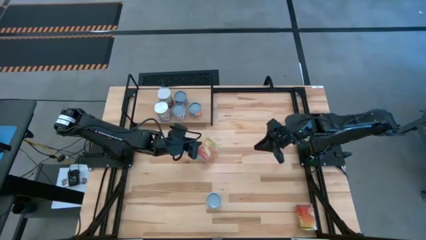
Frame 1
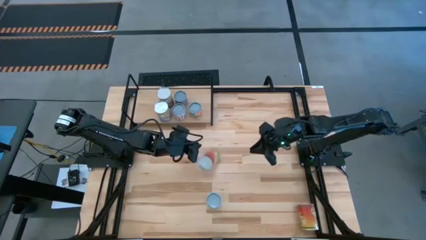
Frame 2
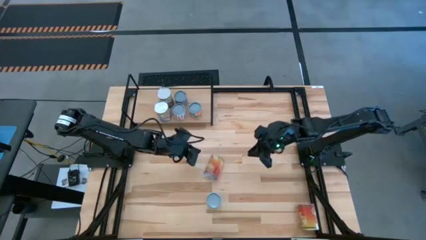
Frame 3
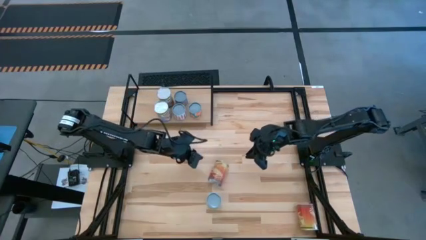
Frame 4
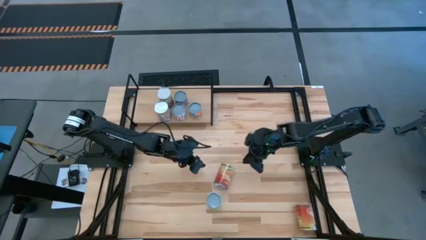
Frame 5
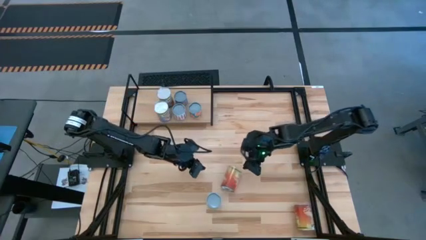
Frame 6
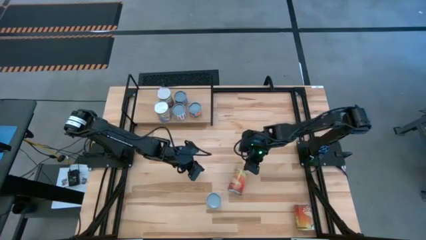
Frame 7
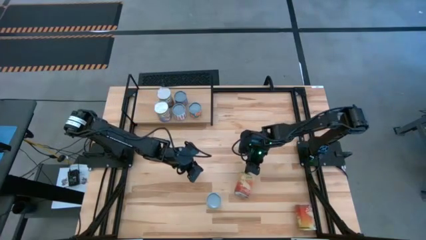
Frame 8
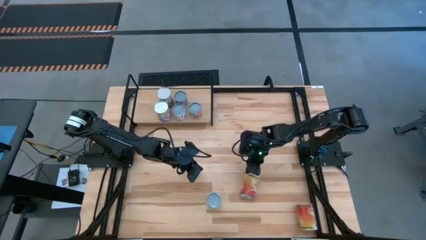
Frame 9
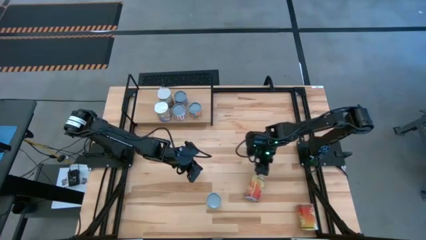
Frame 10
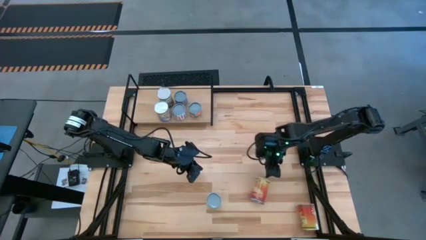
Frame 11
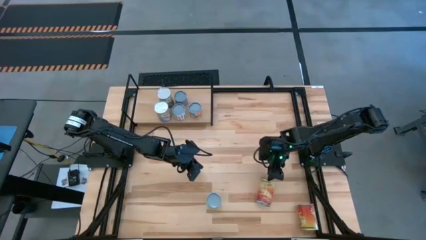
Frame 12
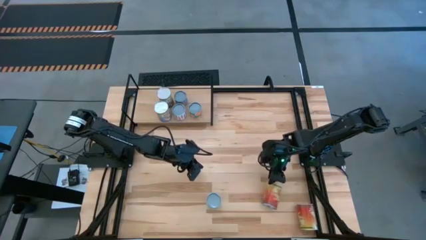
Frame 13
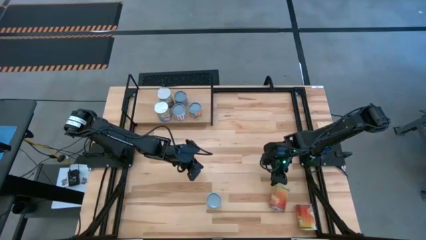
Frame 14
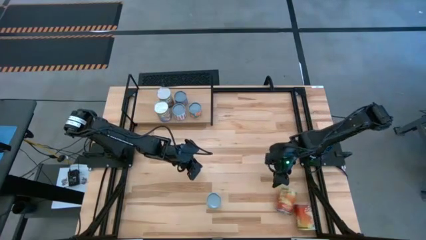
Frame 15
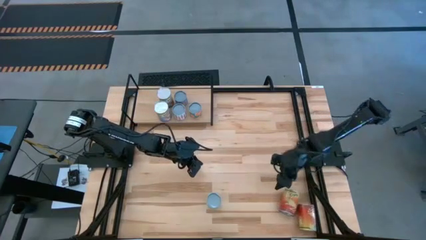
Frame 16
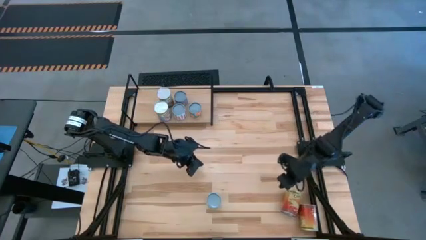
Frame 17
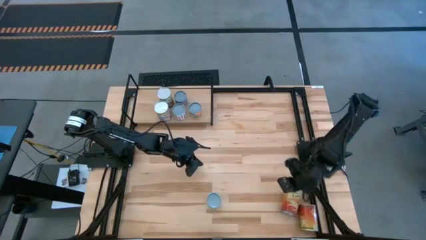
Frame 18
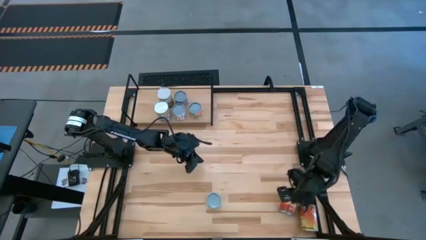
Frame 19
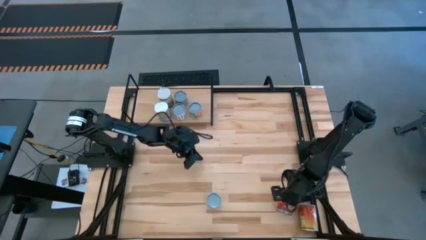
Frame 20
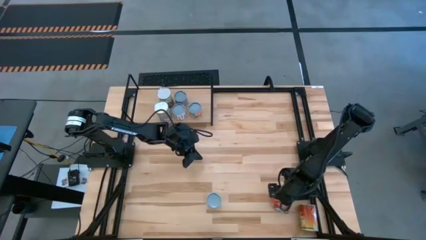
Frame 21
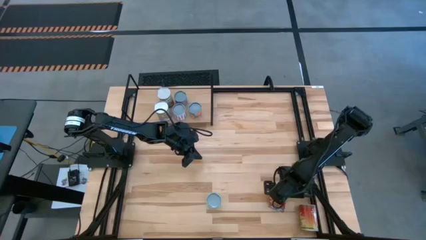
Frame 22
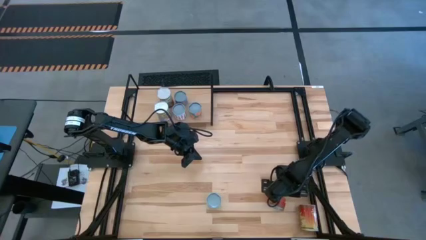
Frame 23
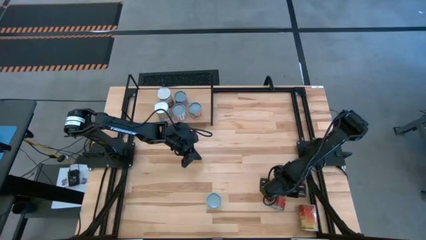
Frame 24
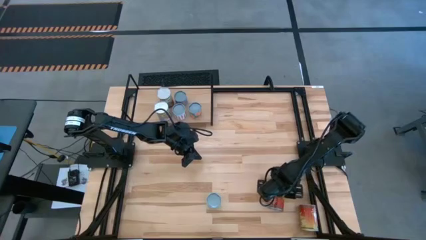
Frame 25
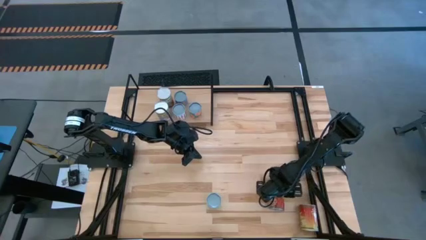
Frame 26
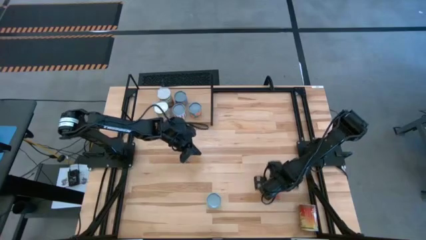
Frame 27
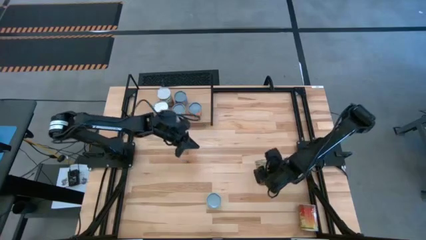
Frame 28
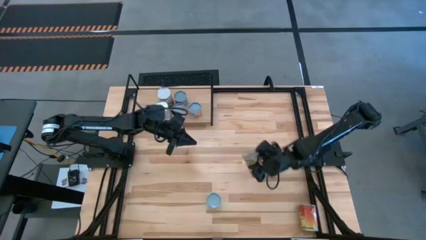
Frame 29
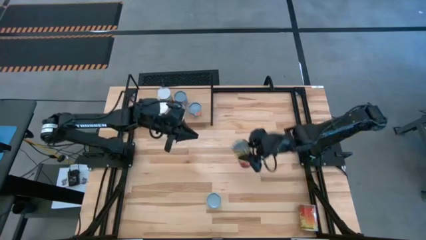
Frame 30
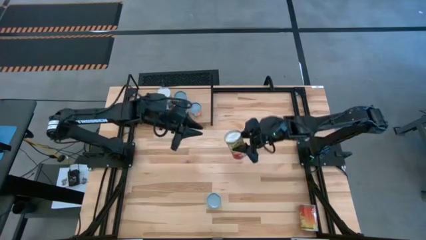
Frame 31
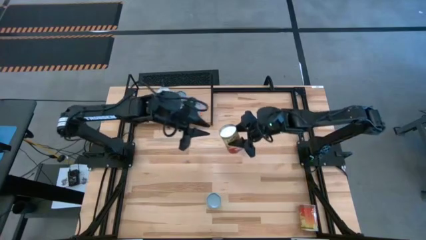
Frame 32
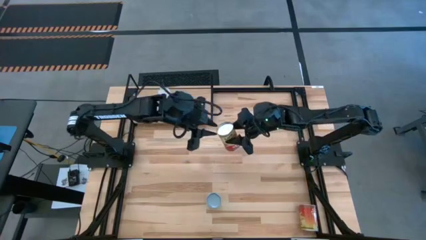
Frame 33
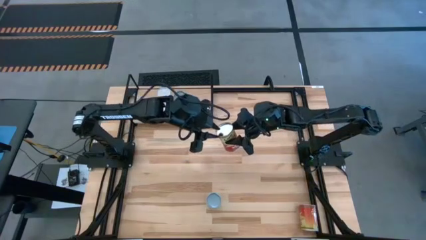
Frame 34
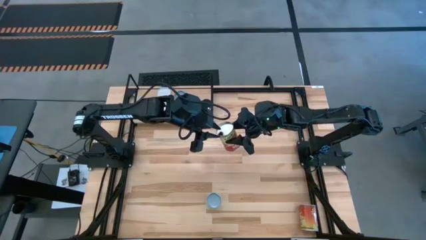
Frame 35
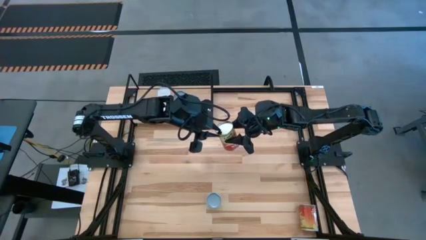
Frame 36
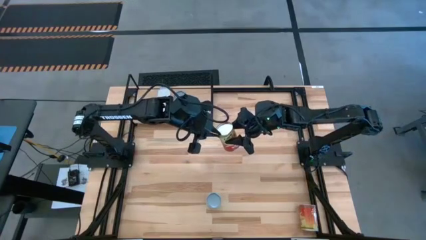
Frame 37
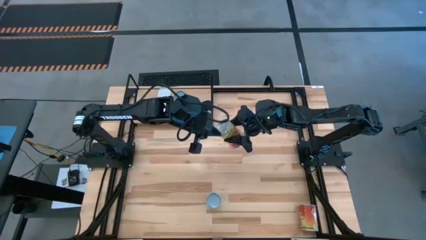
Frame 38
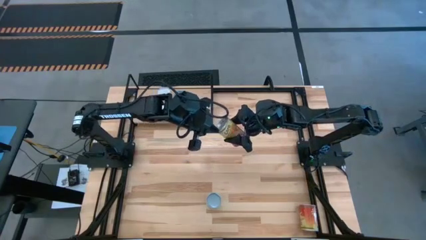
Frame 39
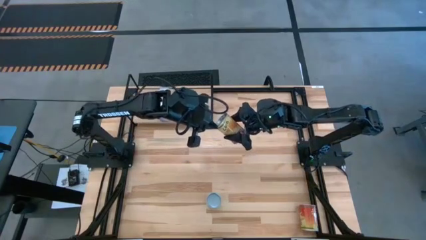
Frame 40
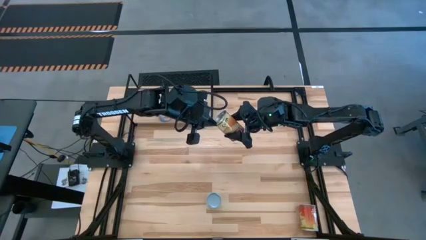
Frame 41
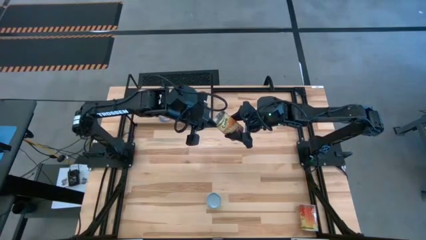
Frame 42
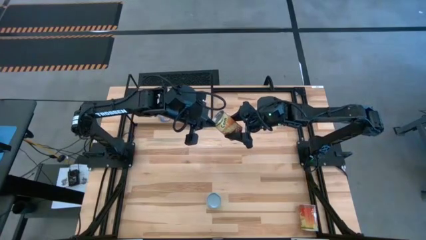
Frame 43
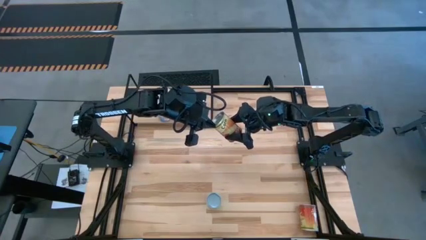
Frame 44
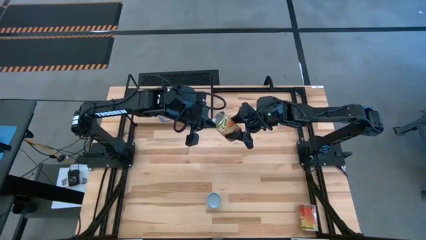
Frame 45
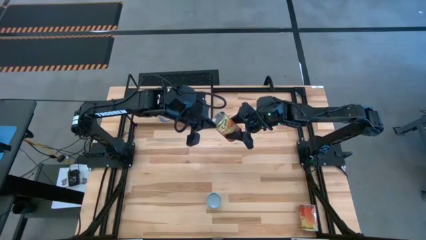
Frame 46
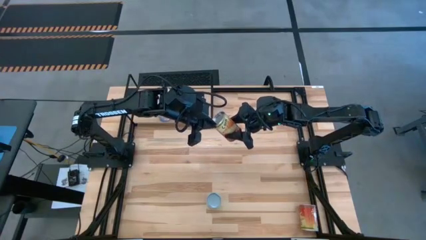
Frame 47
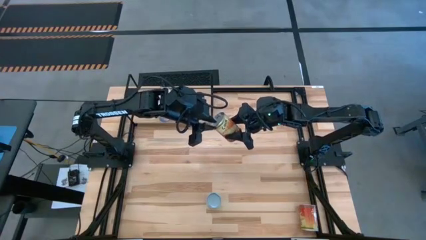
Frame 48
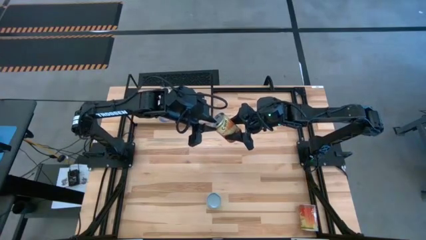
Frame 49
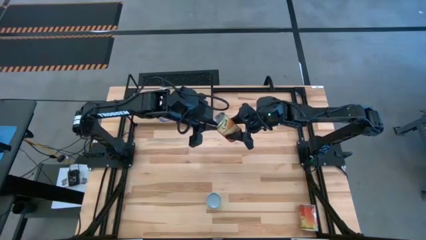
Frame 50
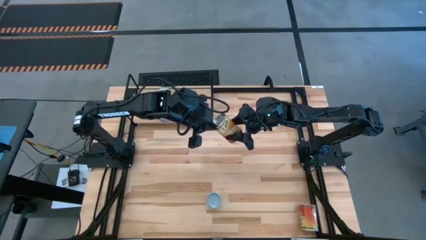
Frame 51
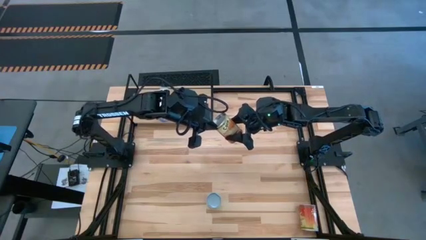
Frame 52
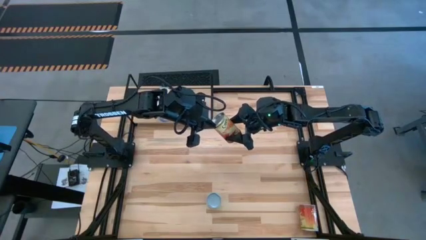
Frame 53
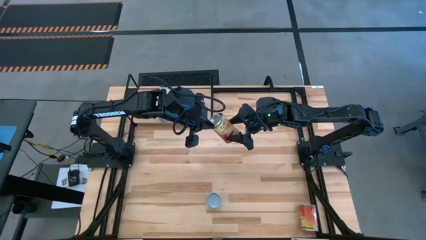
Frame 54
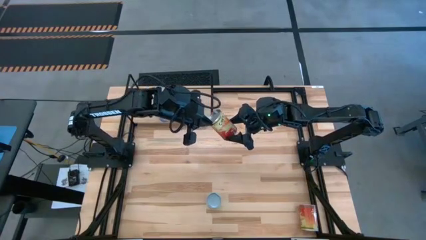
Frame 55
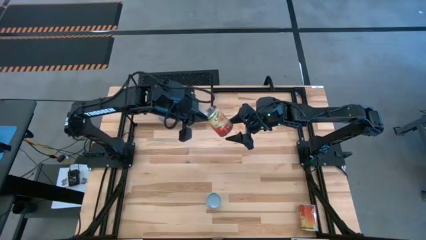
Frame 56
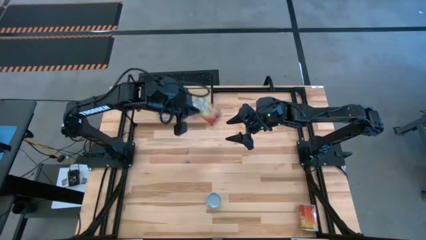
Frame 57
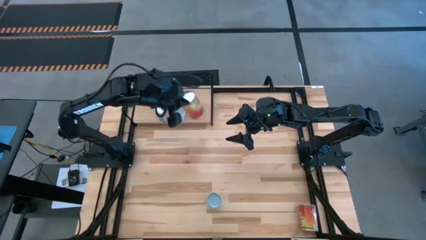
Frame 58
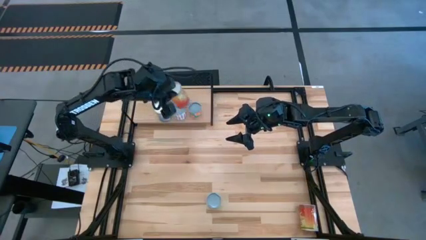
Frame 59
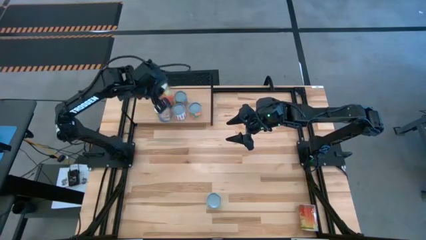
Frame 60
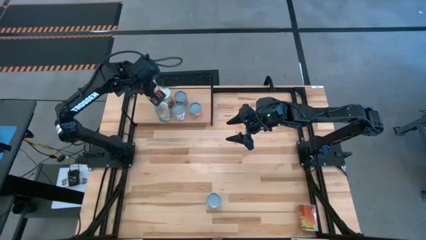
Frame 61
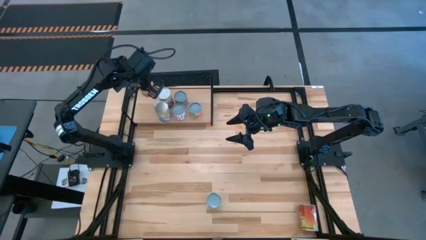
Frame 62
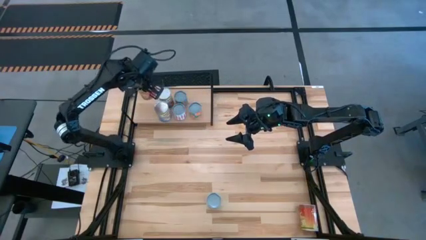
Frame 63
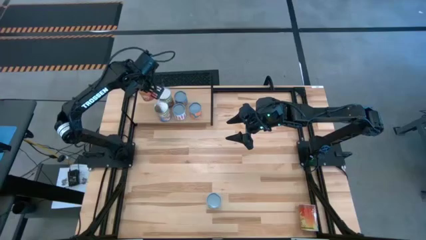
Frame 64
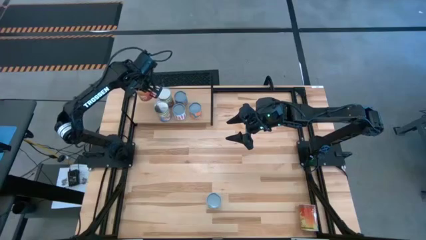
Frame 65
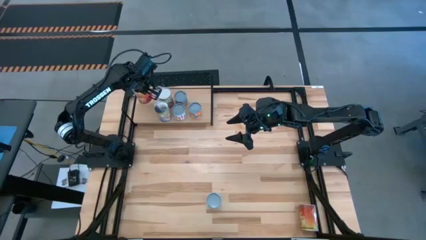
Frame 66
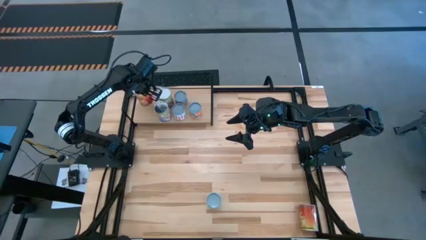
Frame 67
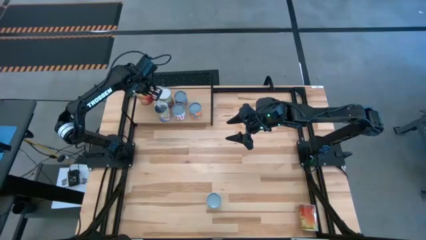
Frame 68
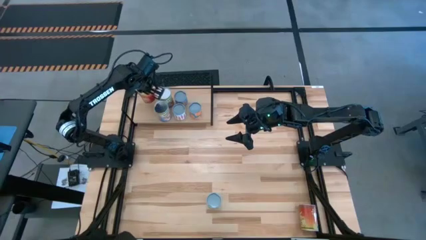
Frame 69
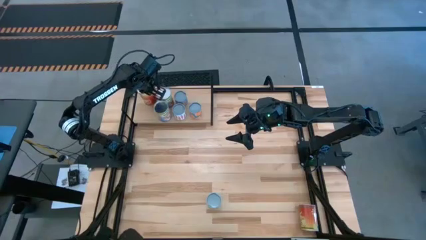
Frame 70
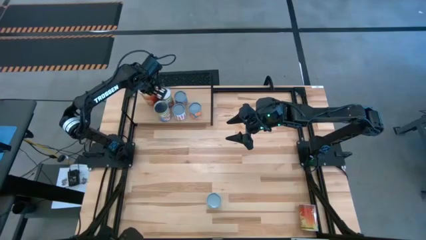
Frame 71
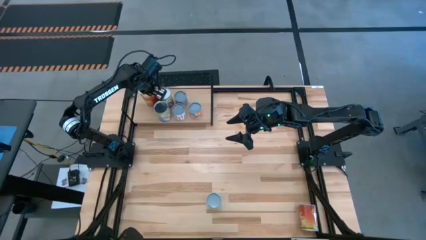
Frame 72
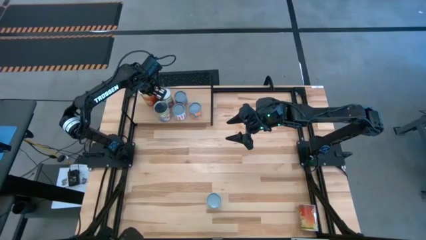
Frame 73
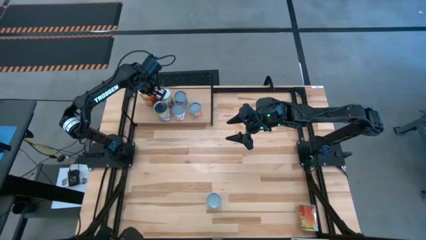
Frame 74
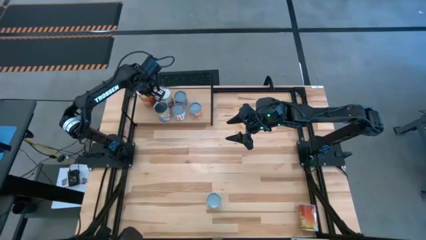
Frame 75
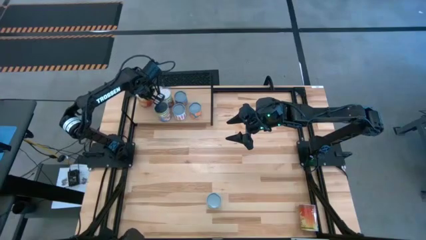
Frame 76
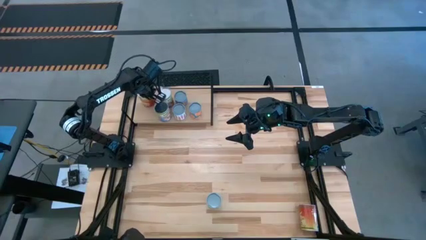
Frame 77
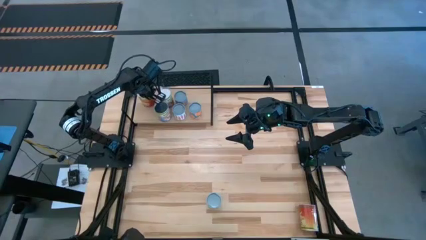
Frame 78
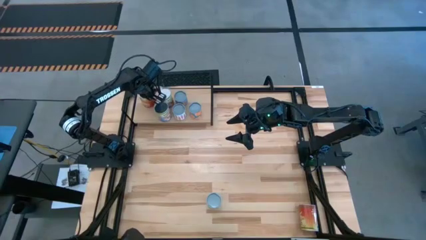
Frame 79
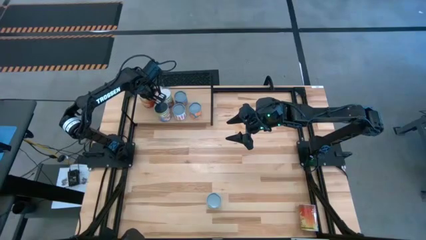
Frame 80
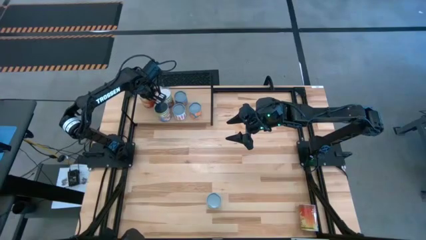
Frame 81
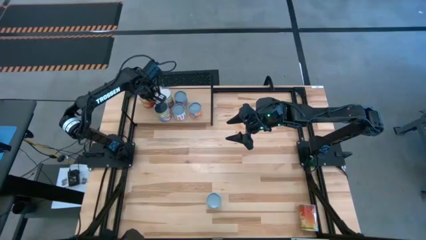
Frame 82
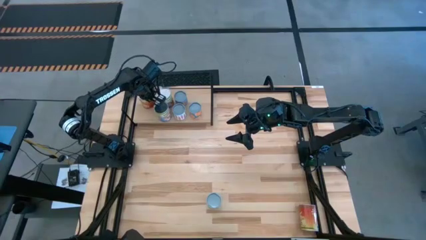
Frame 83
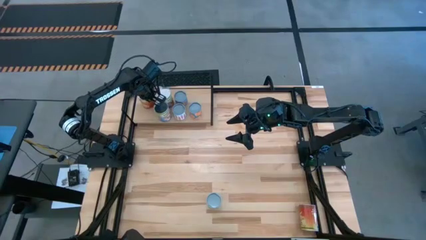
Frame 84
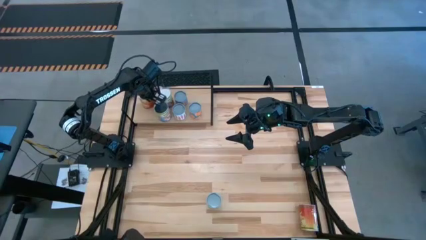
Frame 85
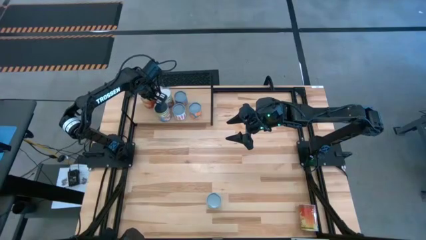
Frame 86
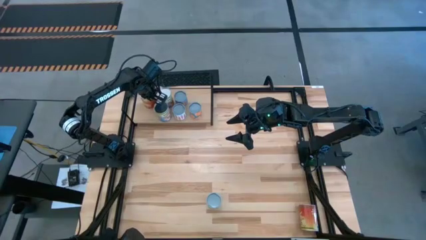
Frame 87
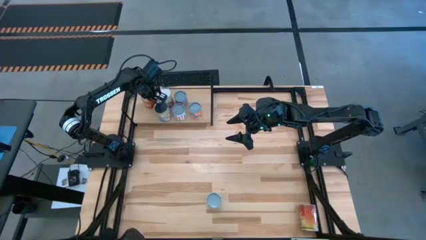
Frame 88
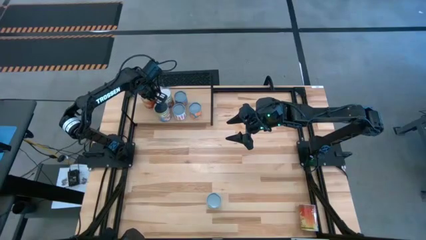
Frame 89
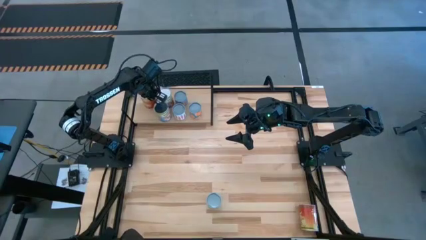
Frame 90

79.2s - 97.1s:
Task: Pick and place cans onto a shelf
Put the left large canned corn on the shelf
